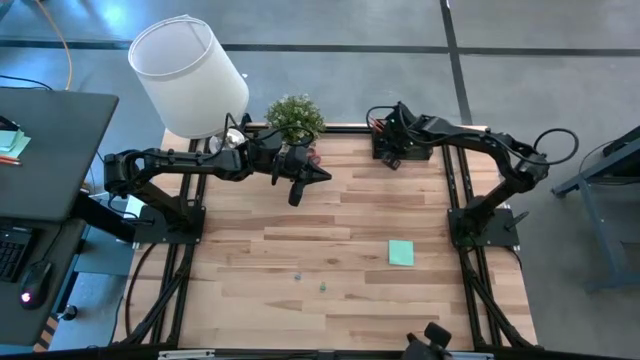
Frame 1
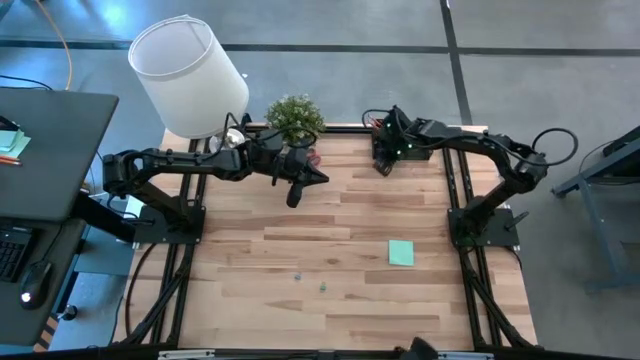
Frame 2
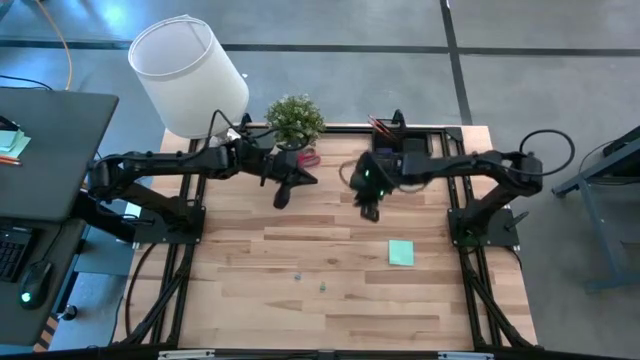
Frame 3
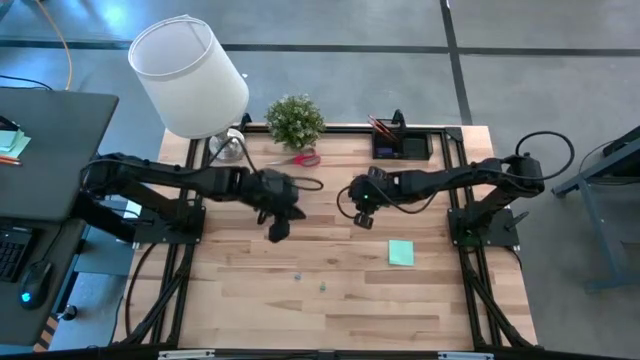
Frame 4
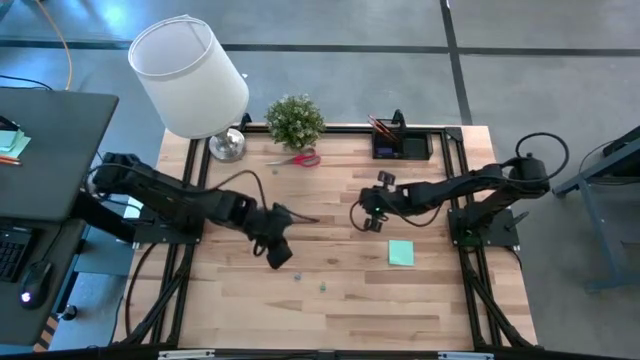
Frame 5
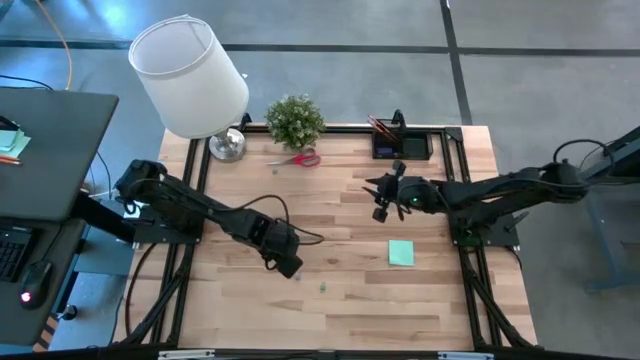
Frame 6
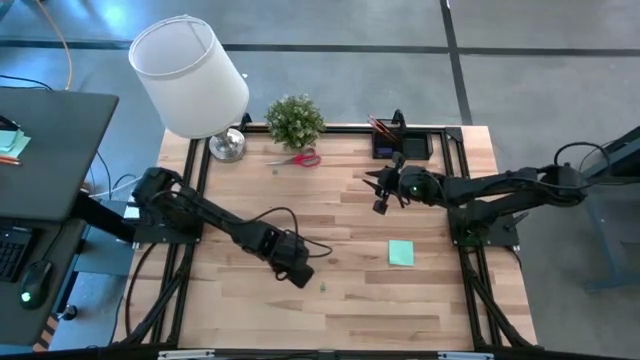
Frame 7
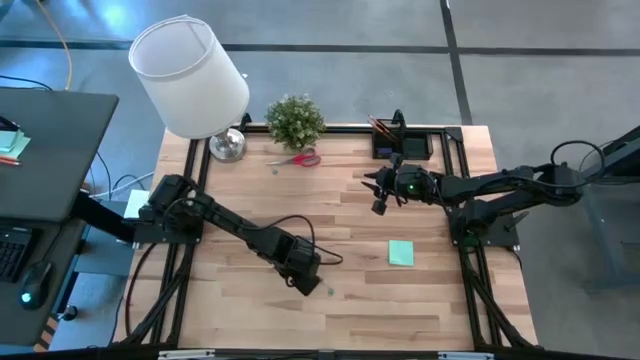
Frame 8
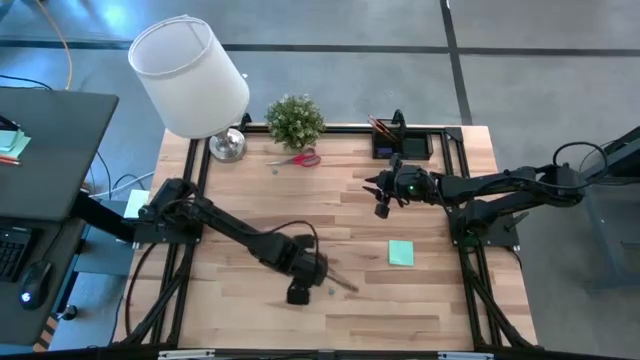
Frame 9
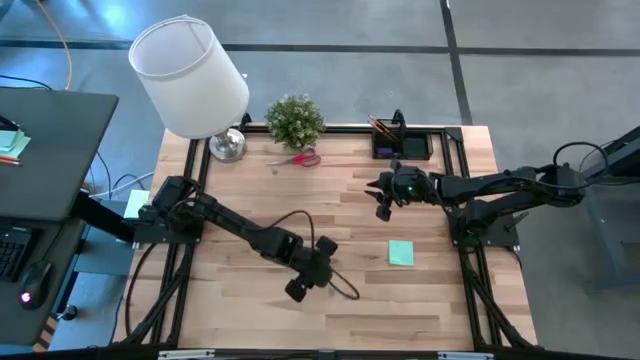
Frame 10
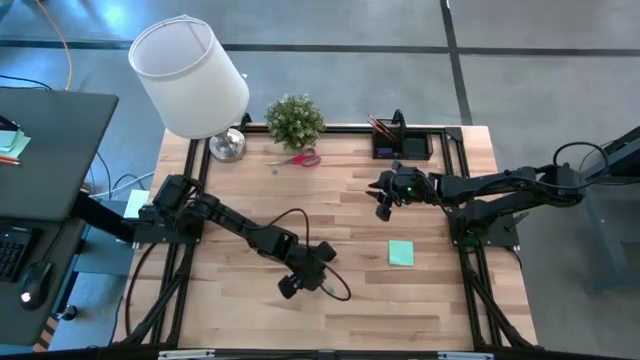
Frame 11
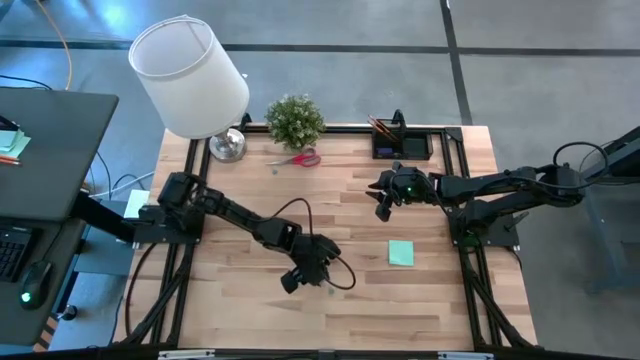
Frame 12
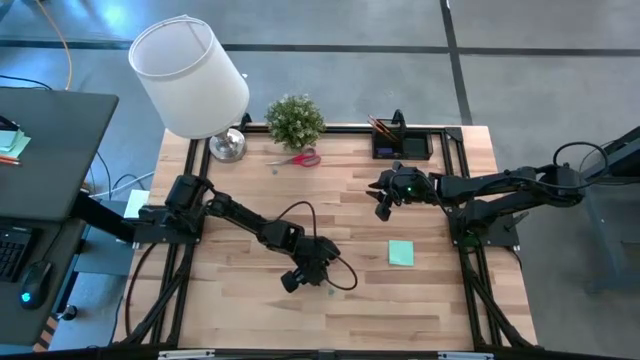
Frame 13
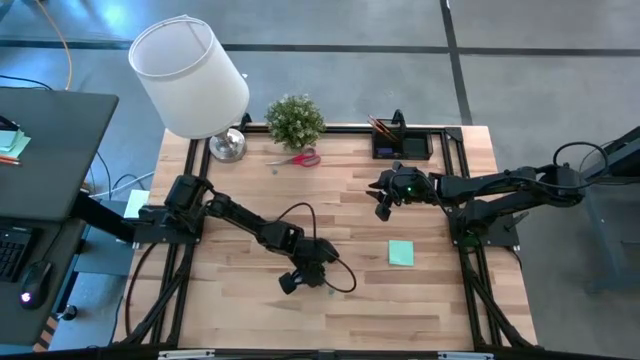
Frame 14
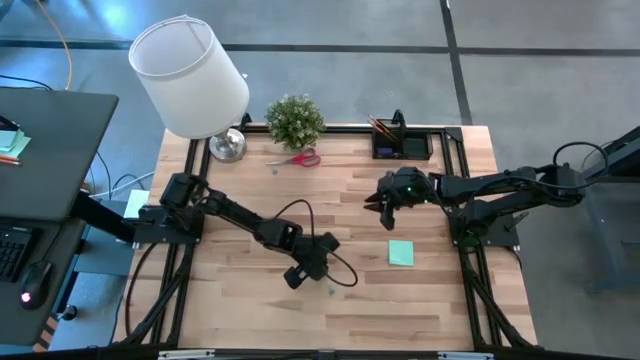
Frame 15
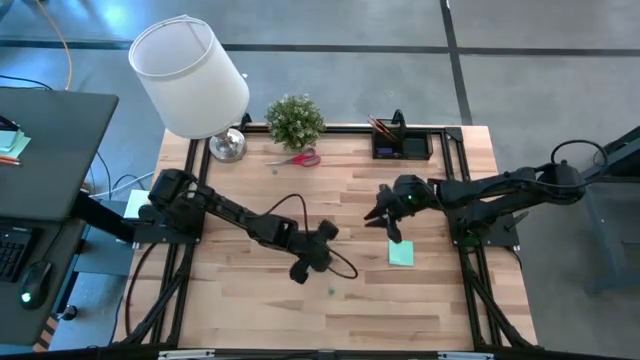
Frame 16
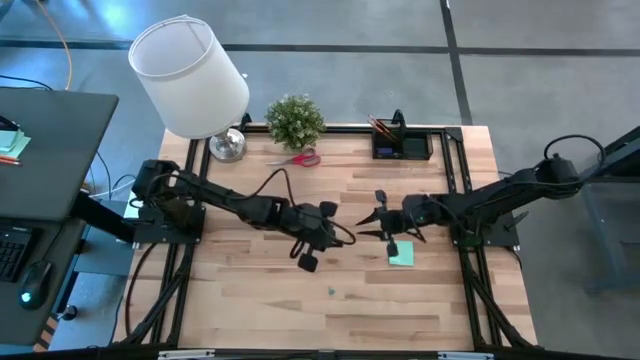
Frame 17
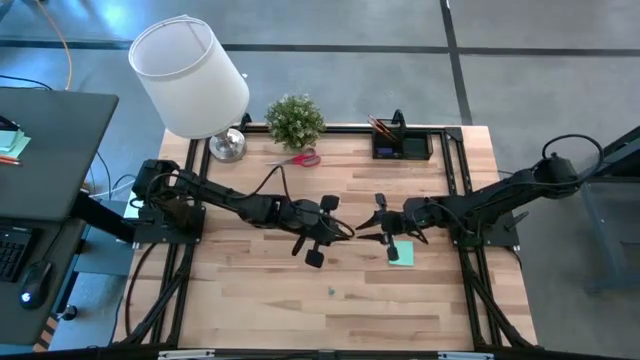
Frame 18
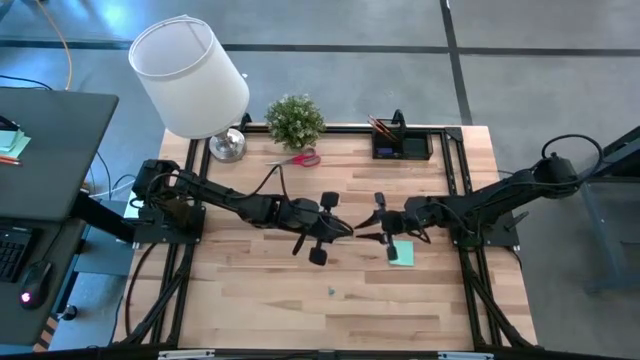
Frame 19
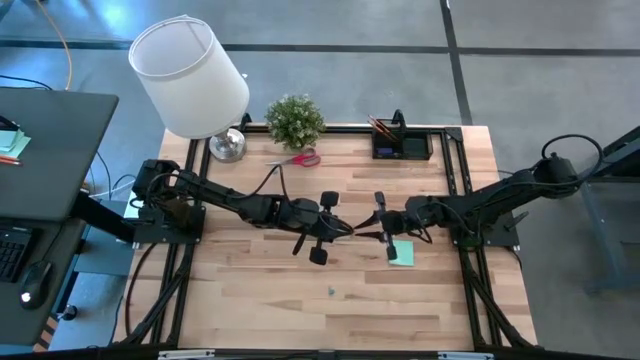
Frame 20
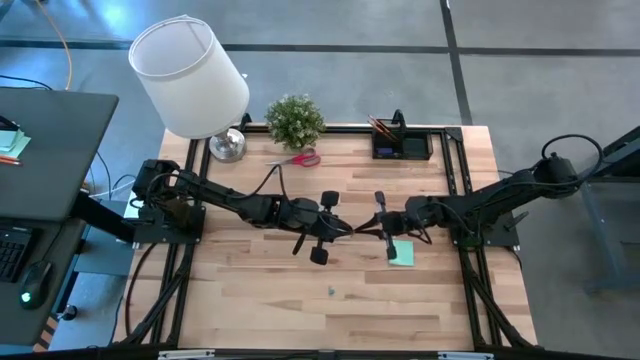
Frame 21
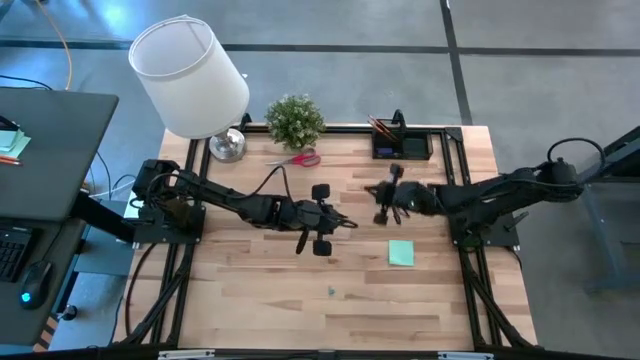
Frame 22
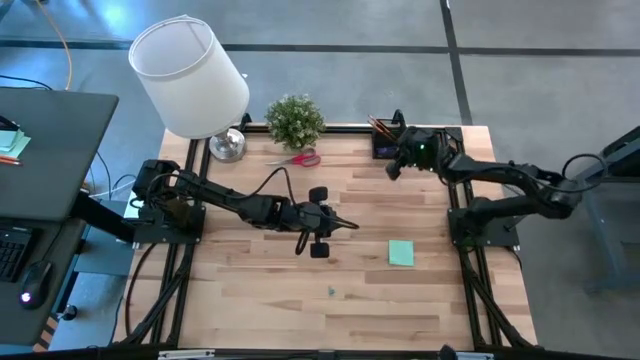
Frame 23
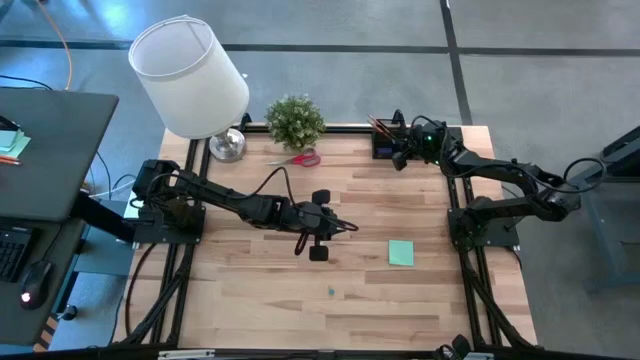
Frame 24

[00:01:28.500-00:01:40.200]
Task: Pick and place office supplies into organizer
Put the blue binder clip in the black desk organizer

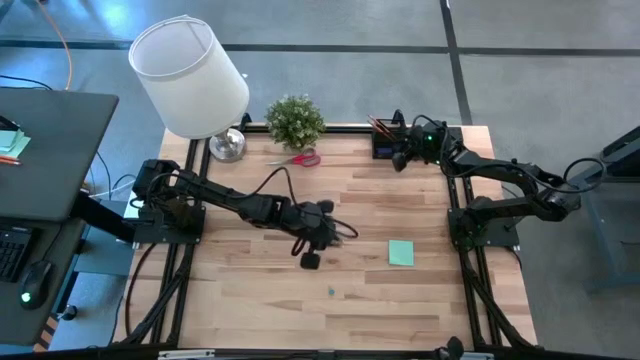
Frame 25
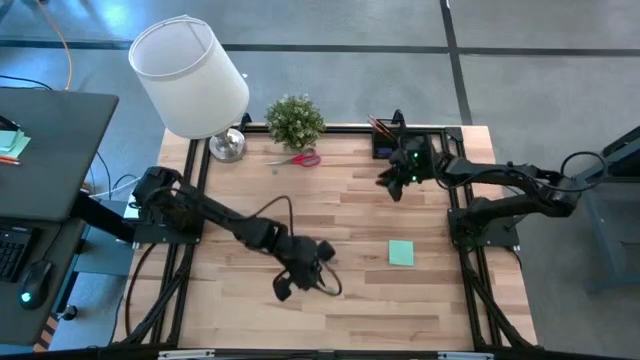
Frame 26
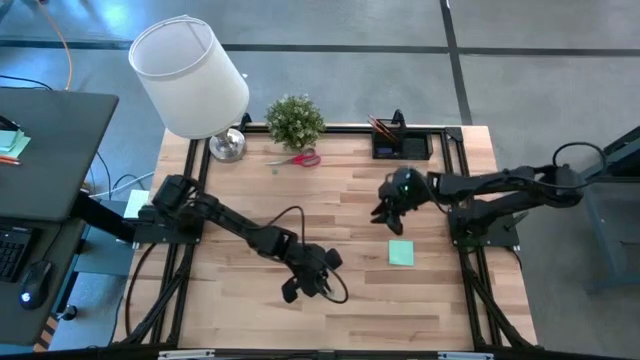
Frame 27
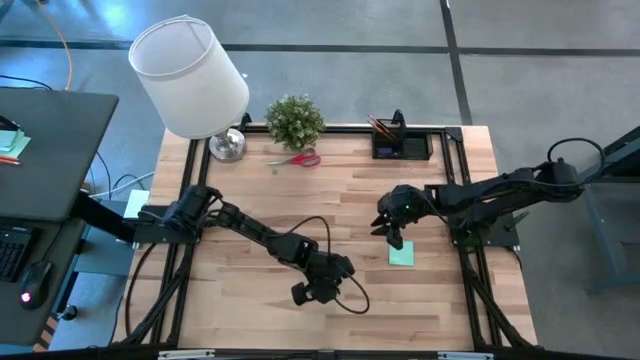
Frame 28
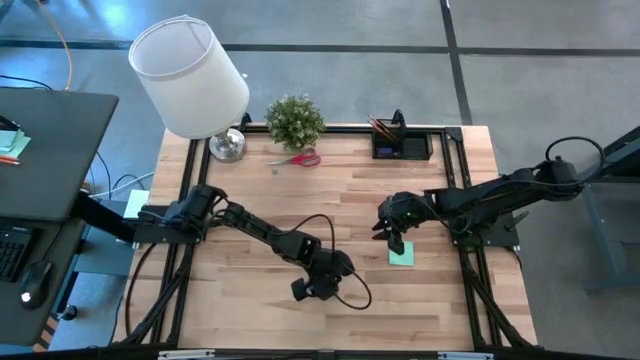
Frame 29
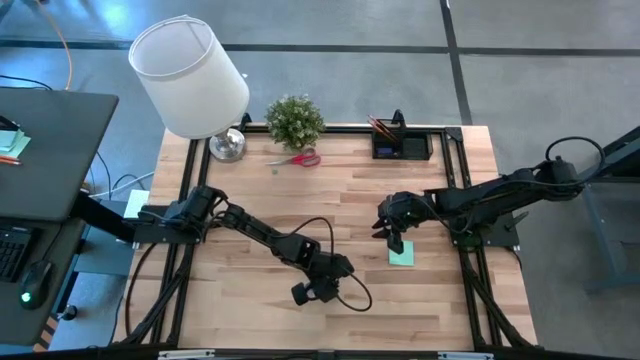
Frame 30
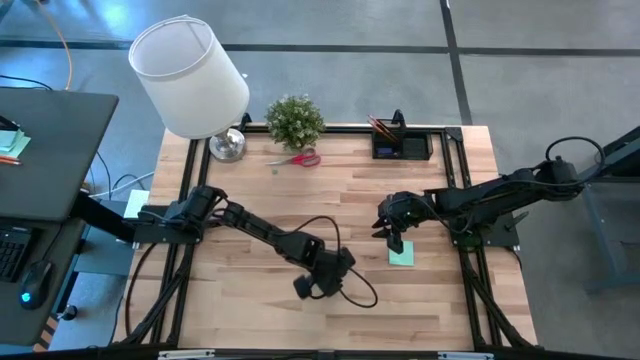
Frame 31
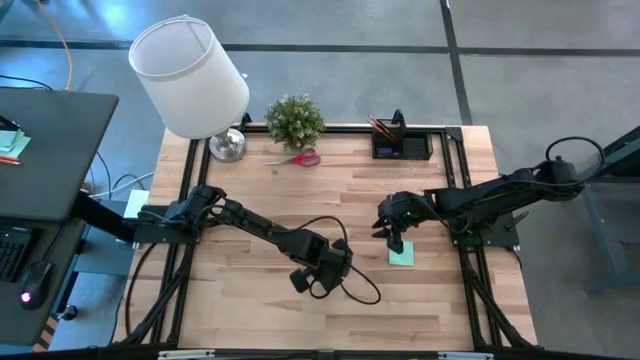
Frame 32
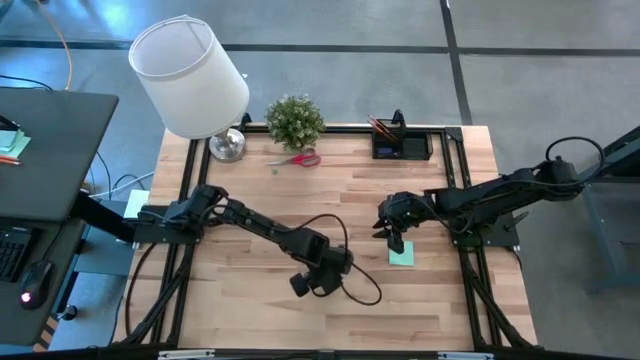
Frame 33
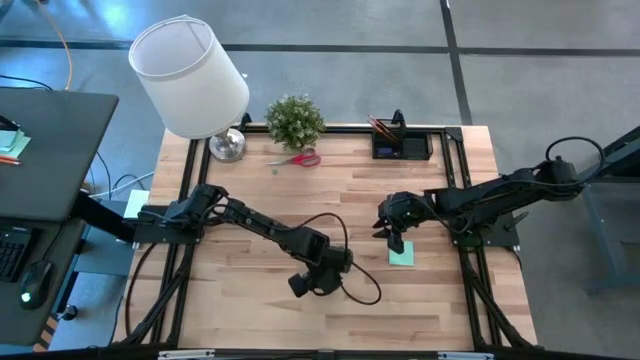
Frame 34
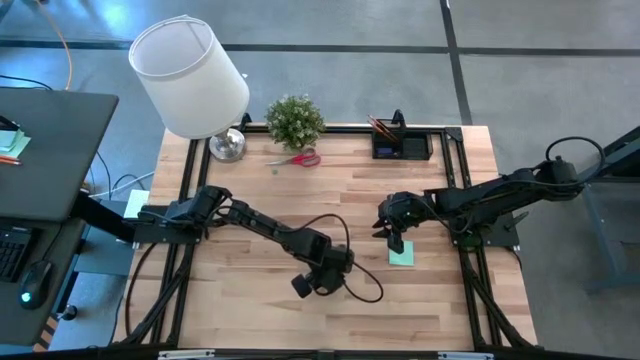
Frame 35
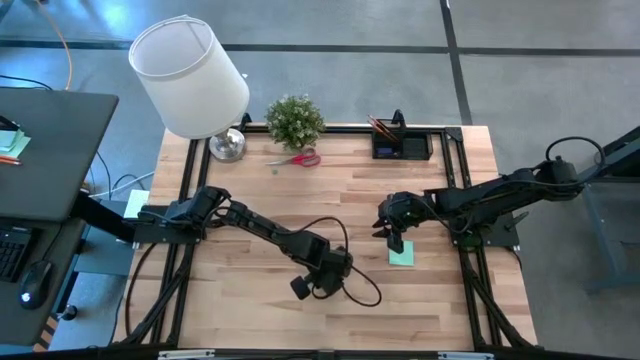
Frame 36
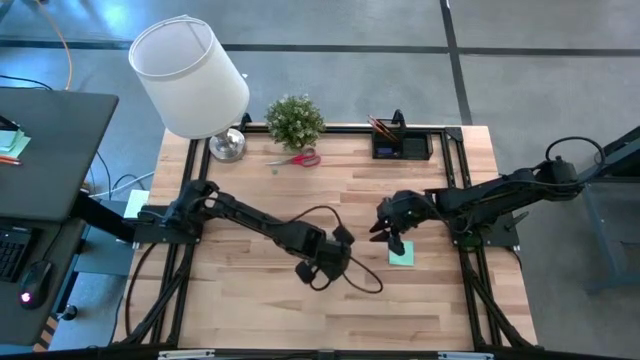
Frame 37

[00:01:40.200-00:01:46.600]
Put the bottom light blue binder clip in the black desk organizer

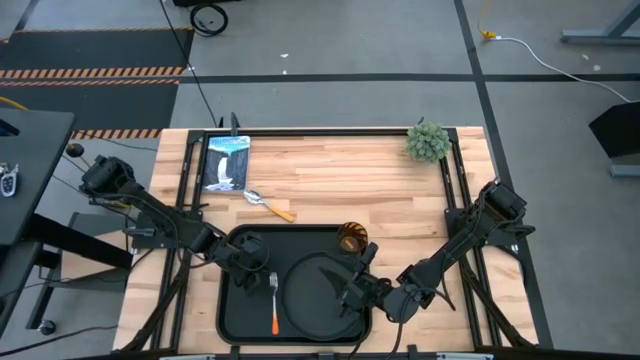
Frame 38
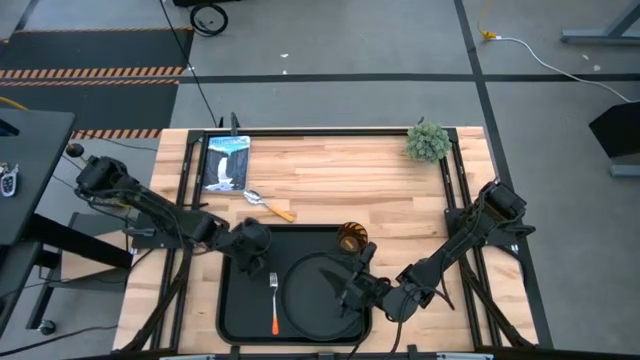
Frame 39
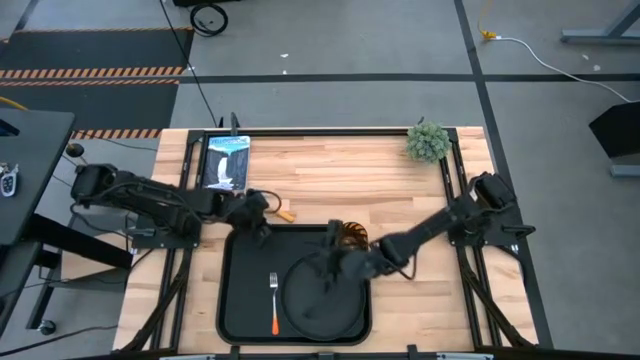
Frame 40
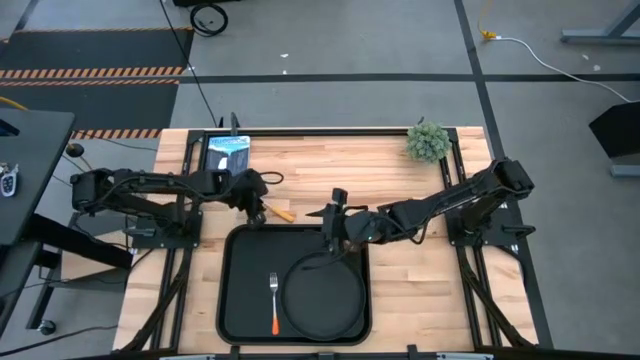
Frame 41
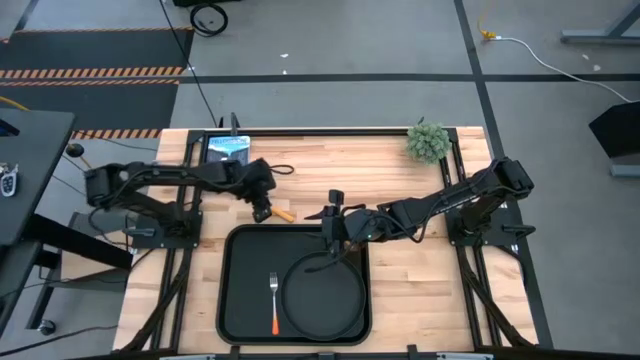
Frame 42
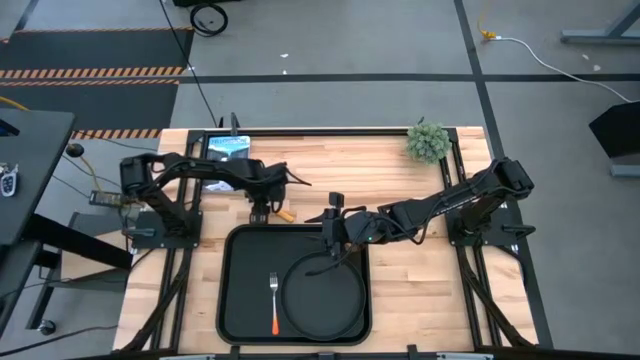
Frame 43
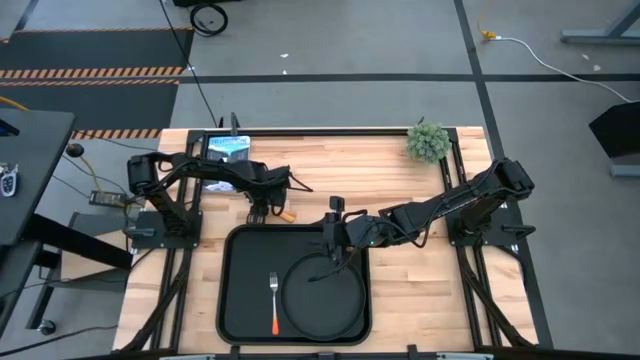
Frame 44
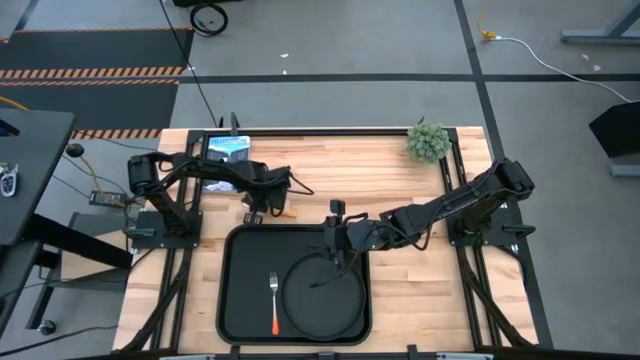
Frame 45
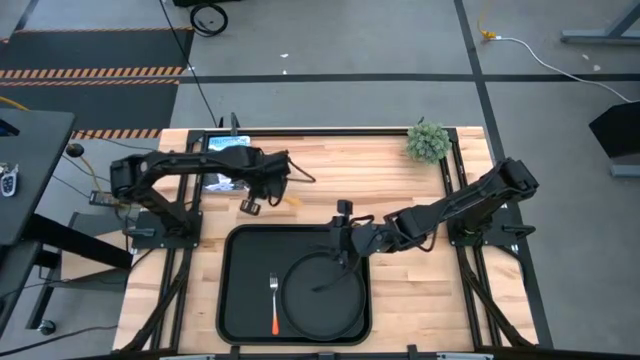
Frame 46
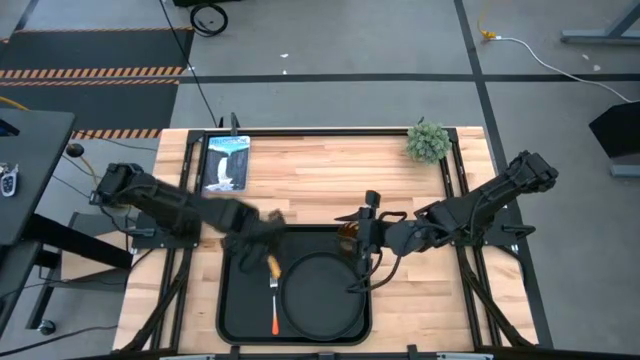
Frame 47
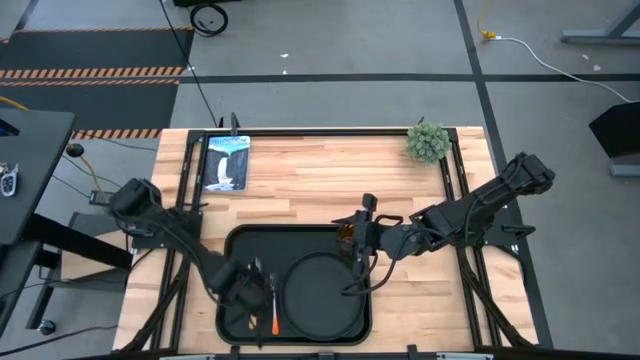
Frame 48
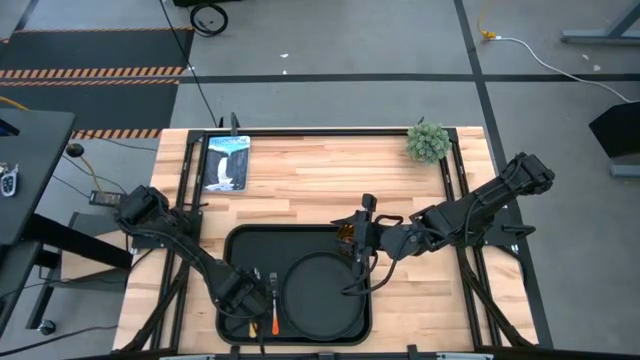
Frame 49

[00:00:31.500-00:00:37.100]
Task: Pick and place plate/cup/fork/spoon on tray
Put the brown spoon next to the orange fork on the left side of the tray
